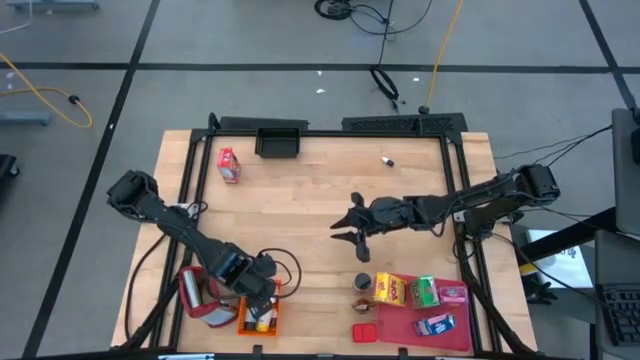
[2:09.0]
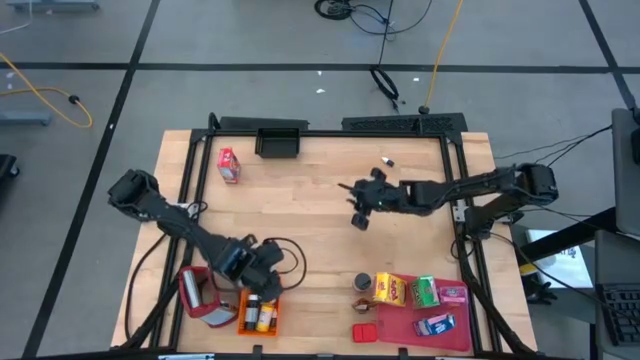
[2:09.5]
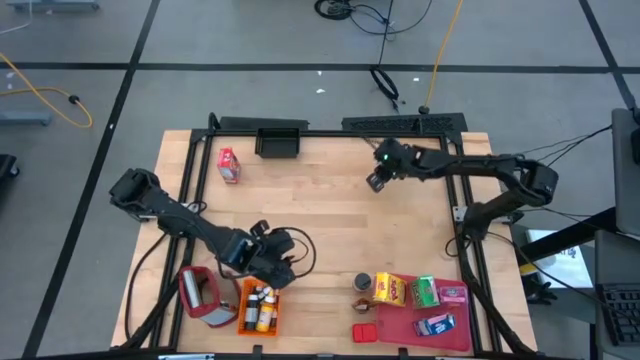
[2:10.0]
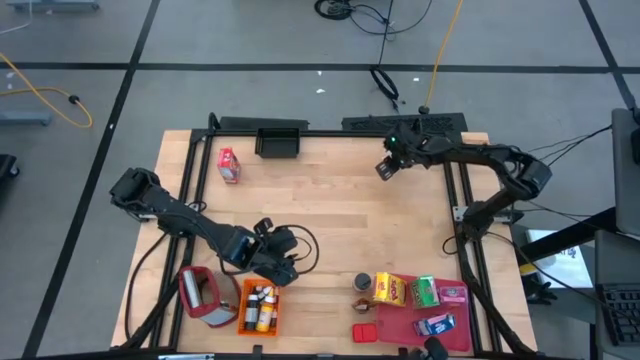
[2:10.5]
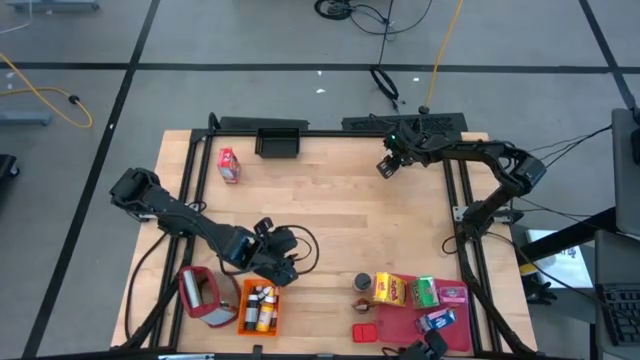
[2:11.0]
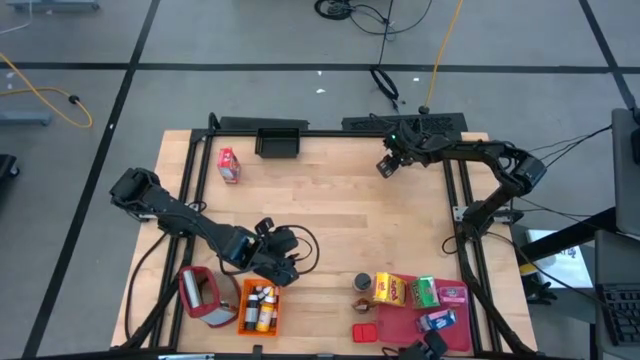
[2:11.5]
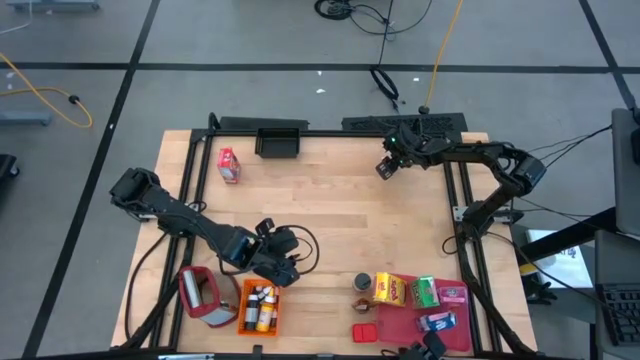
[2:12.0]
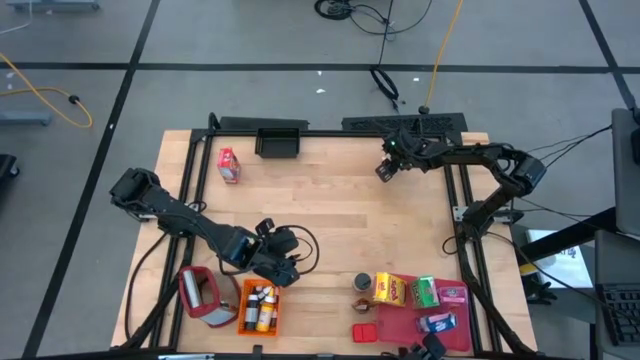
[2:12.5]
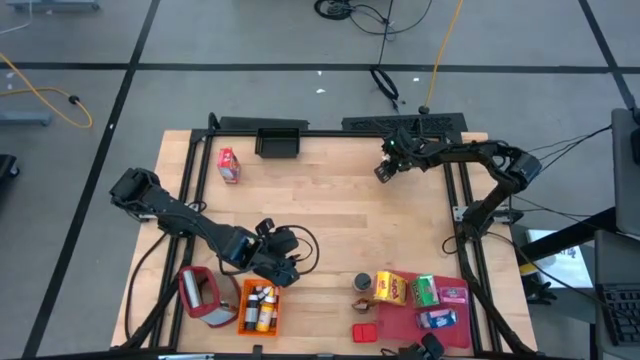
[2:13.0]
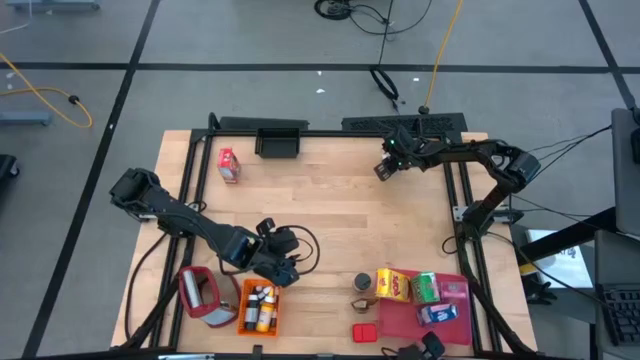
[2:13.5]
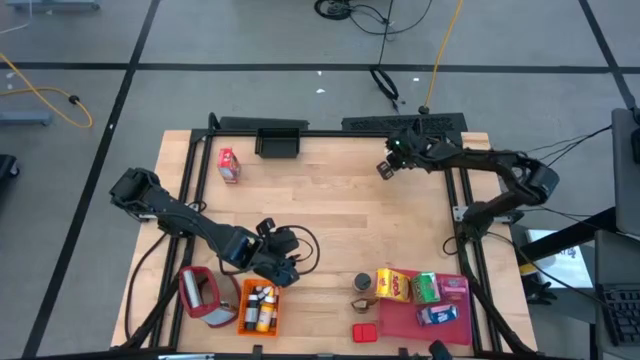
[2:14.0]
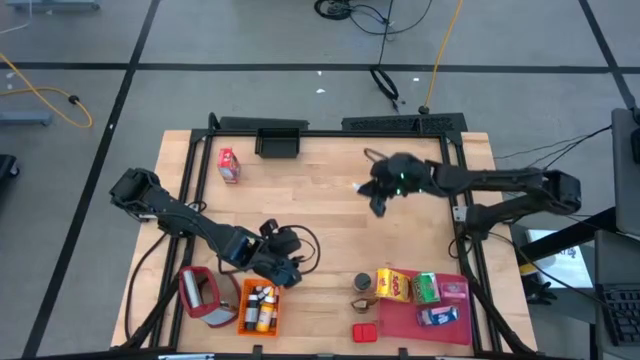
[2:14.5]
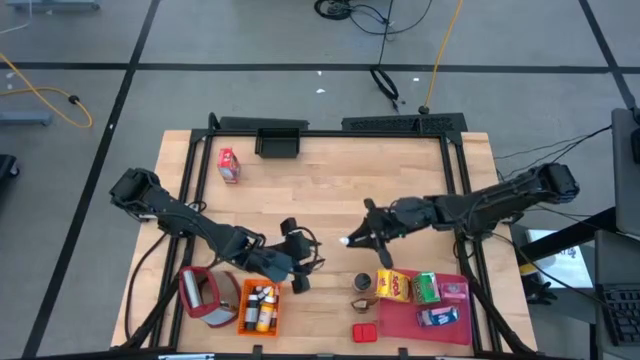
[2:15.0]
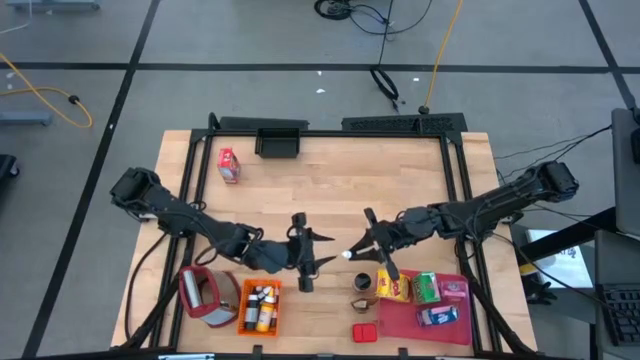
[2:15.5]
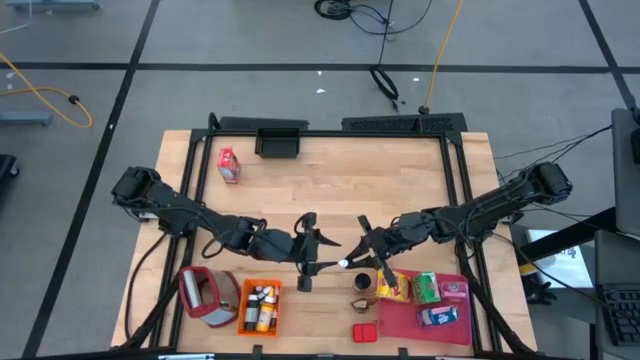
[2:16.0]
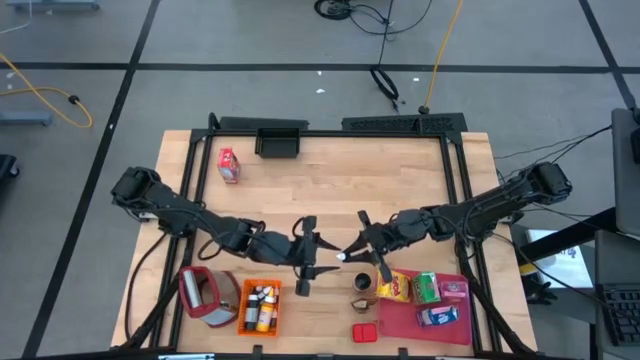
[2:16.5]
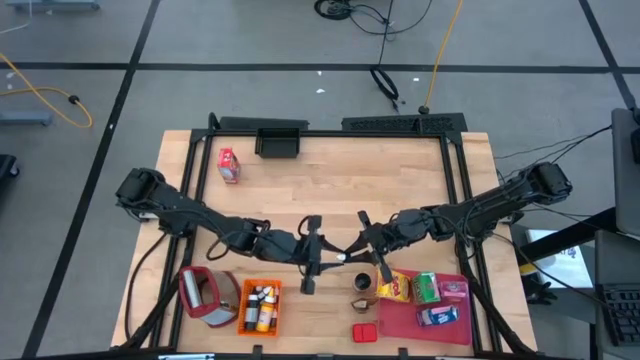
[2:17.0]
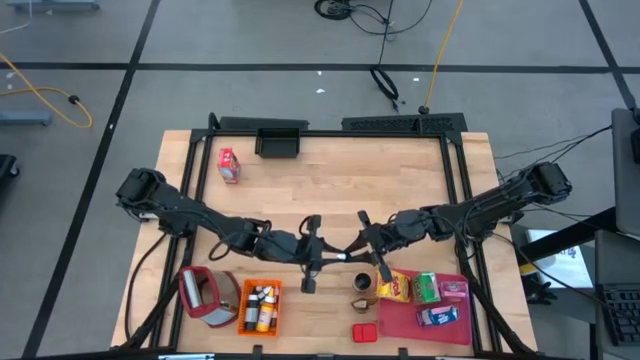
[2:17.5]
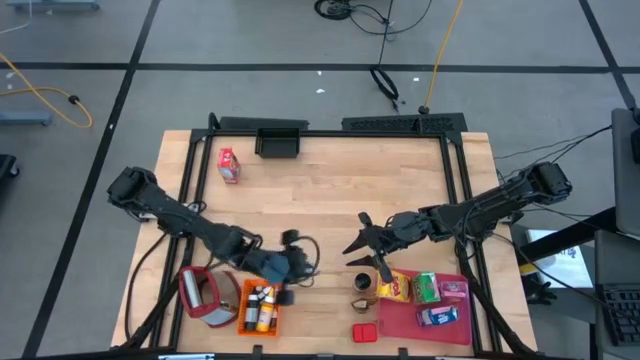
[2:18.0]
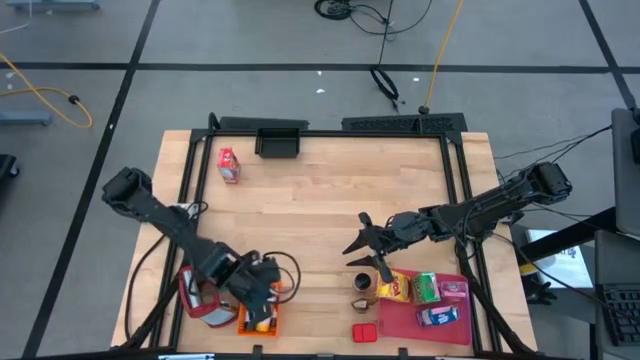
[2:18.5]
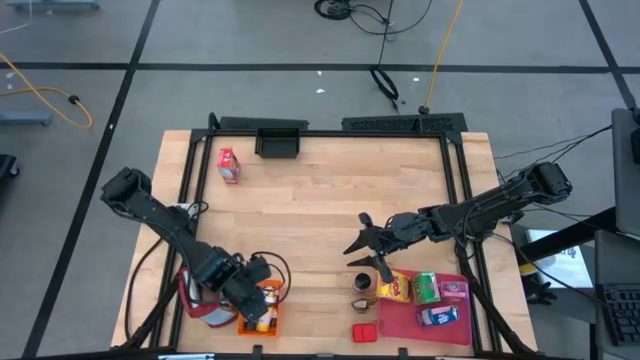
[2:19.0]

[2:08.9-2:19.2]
Task: Pick & Place Kitchen Items
Put the small blue food coloring bottle into the orange bin

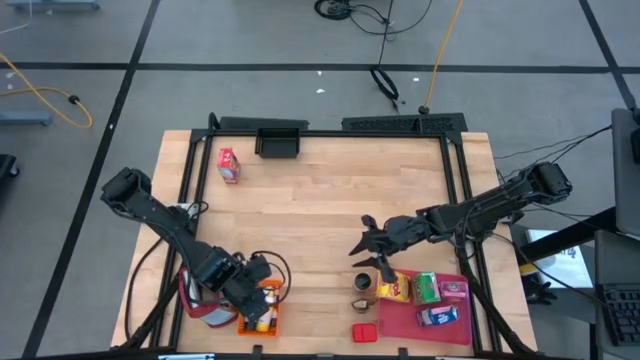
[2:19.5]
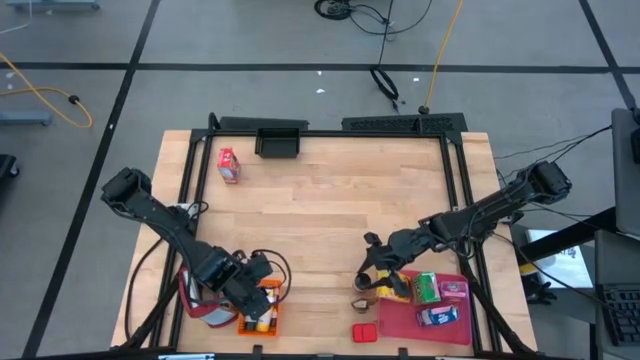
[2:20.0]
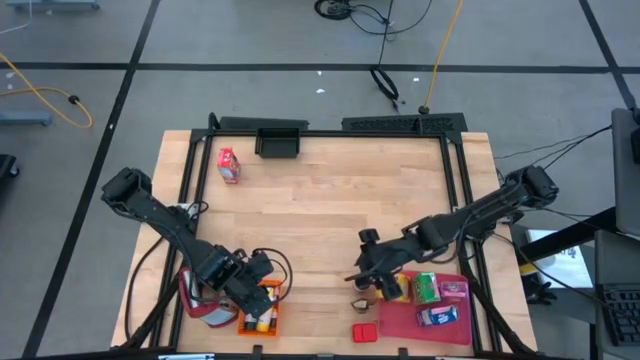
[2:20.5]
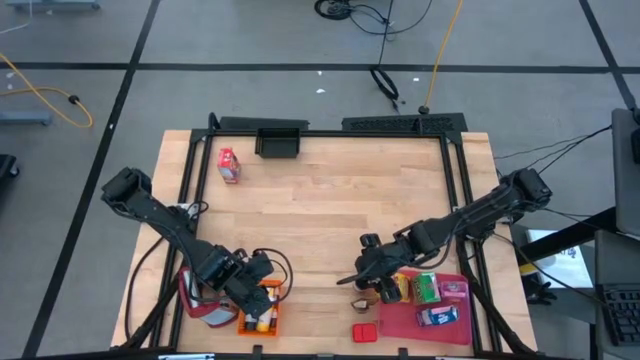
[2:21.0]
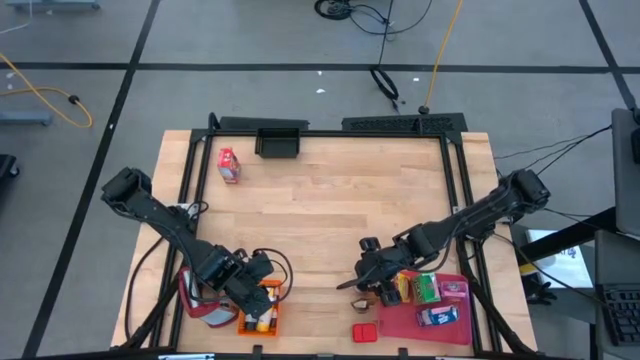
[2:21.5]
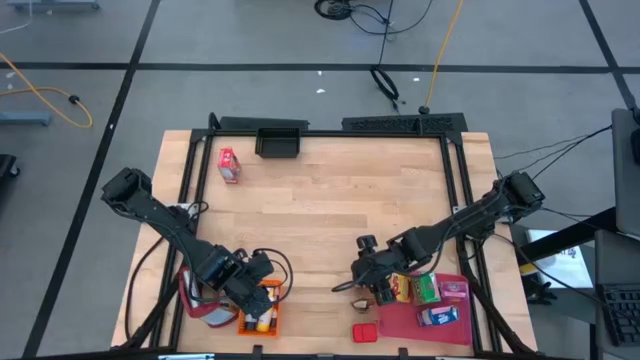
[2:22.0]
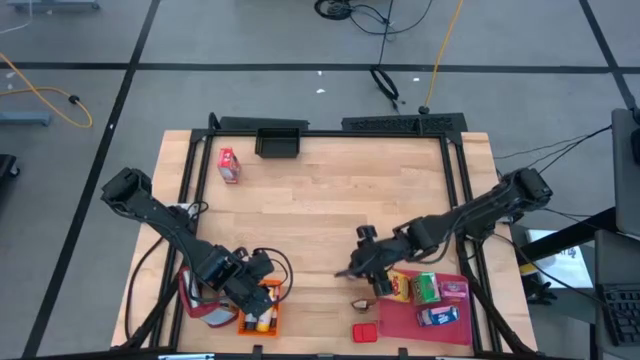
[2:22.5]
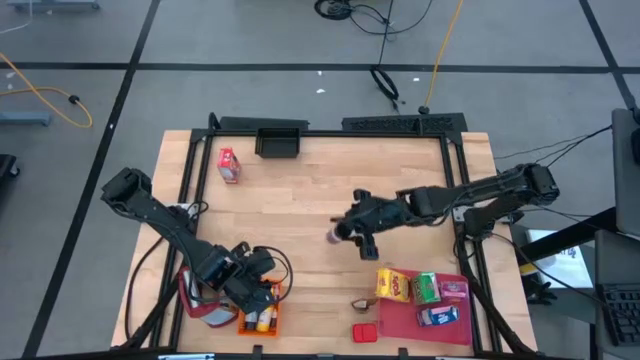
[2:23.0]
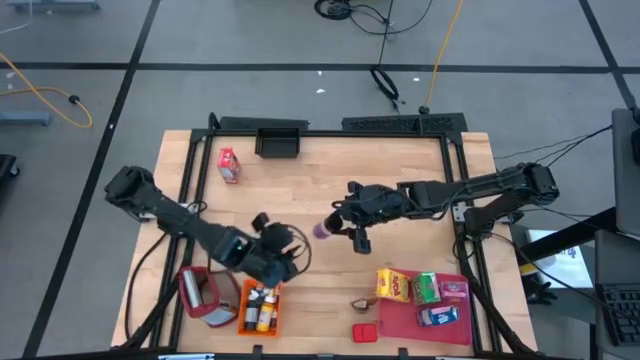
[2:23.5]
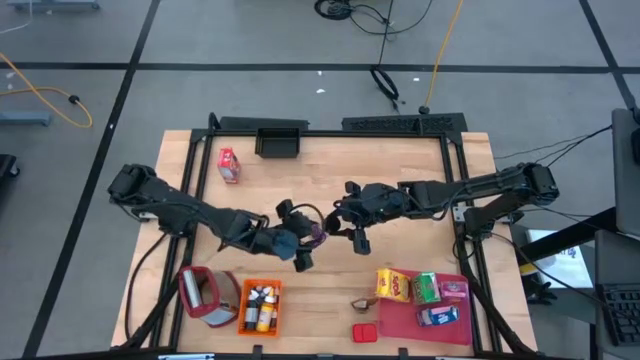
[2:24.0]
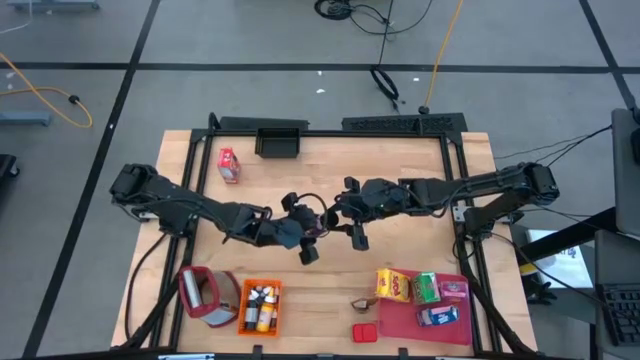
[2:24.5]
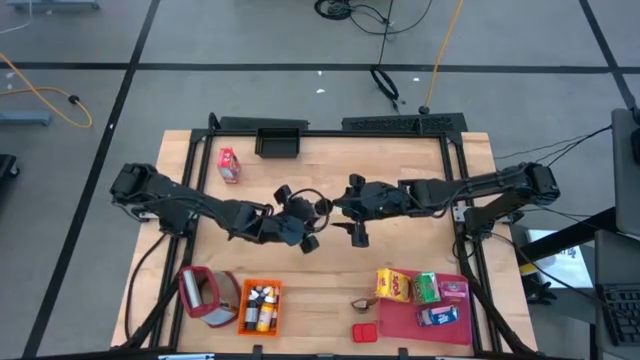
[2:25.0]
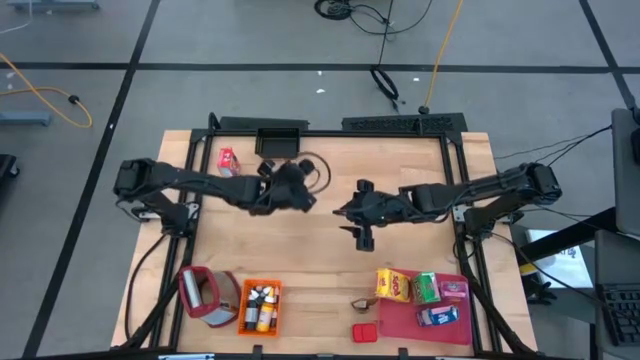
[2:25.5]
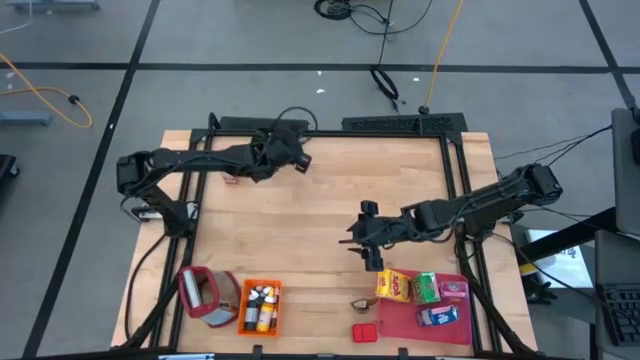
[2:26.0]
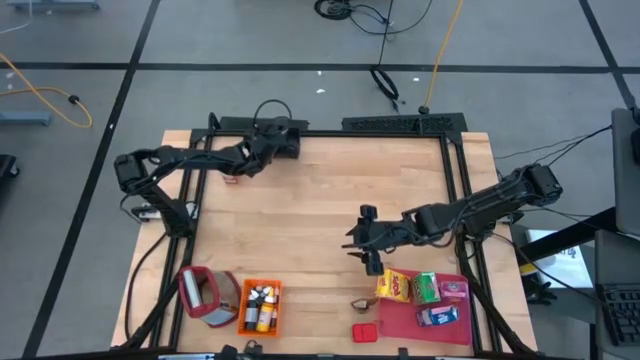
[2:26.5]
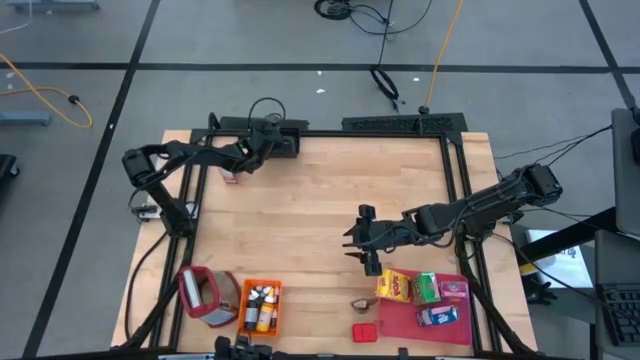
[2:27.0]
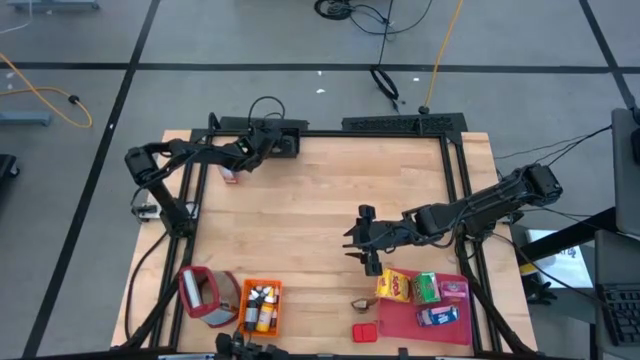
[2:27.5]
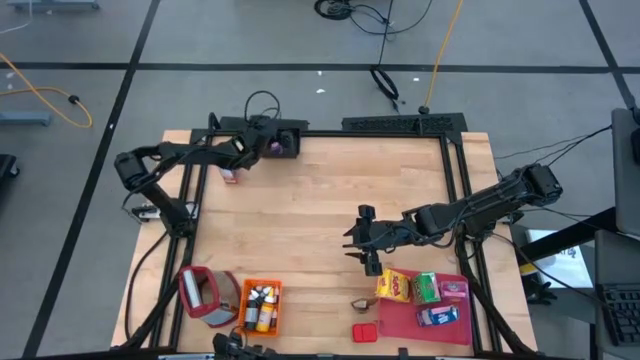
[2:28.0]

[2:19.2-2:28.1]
Put the purple seasoning bottle into the black bin

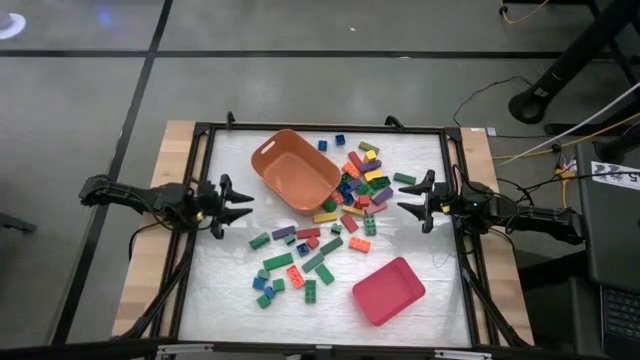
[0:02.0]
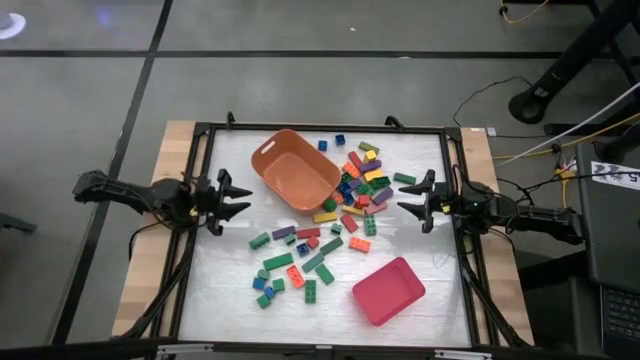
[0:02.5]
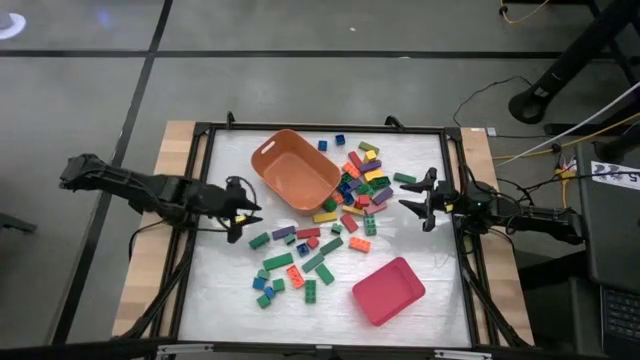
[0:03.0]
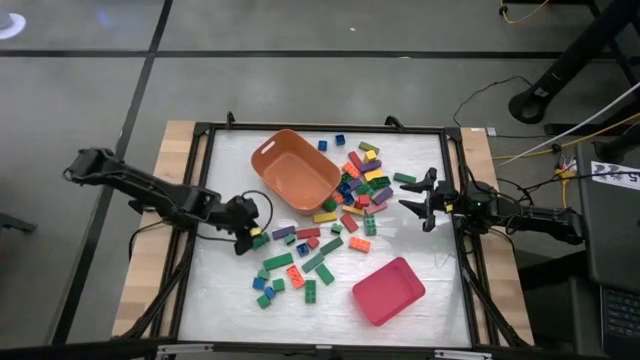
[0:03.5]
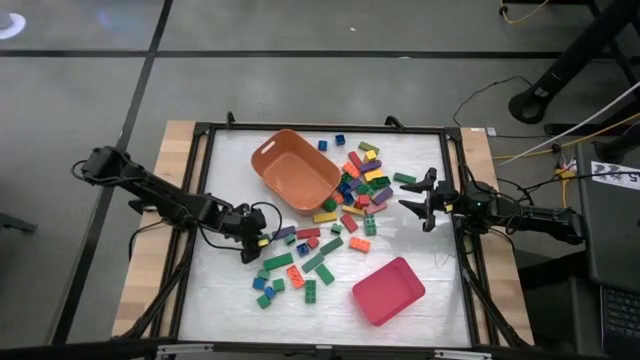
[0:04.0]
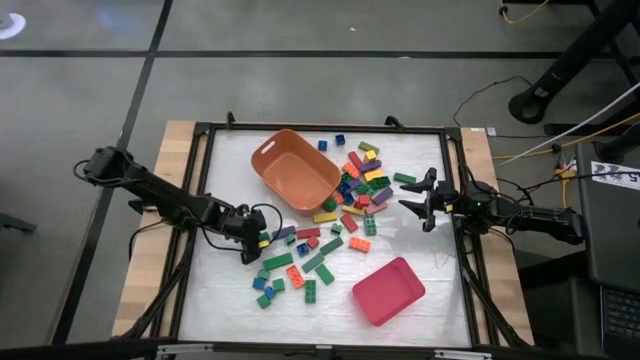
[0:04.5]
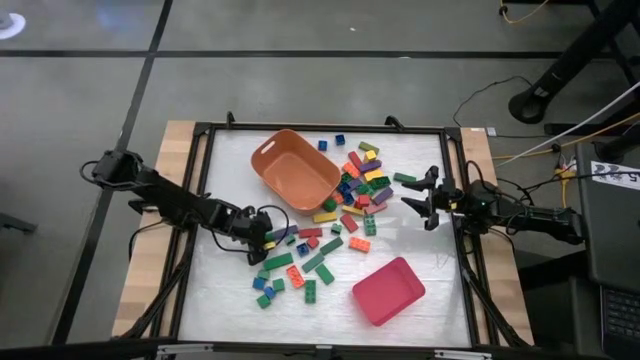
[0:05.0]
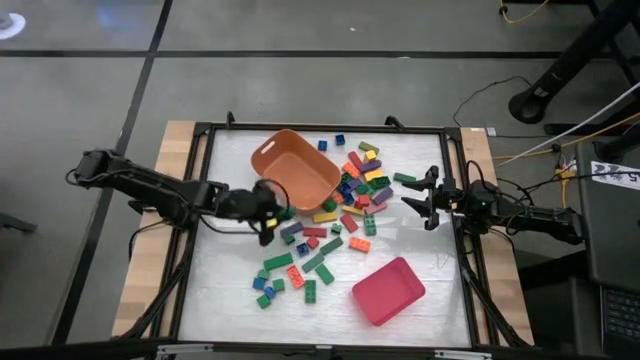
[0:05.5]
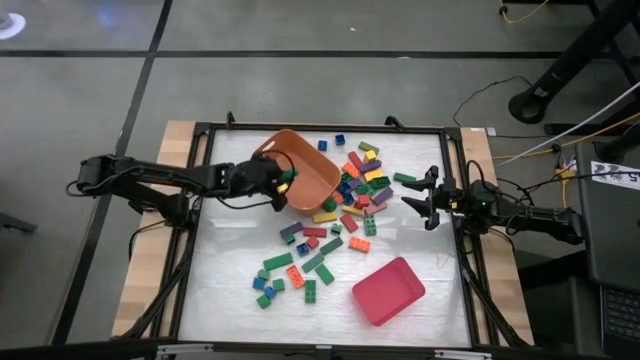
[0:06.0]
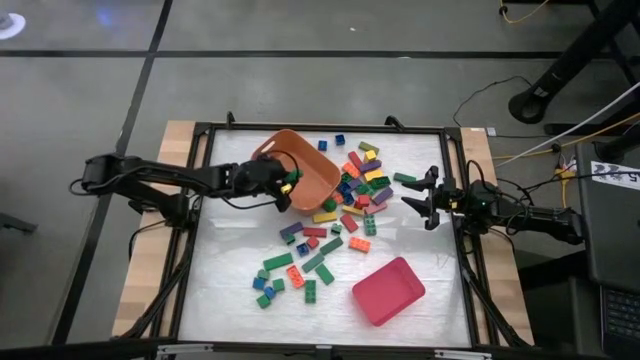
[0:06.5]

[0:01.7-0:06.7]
Task: Sort blocks by size
Put the large green game piece into the orange bin
